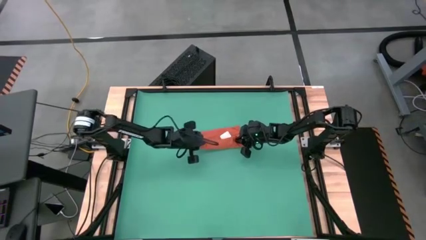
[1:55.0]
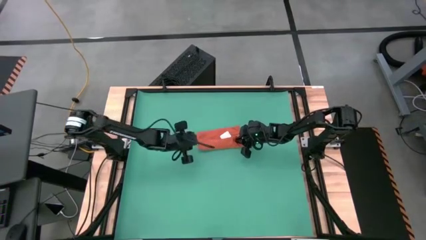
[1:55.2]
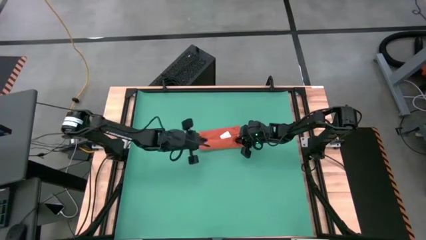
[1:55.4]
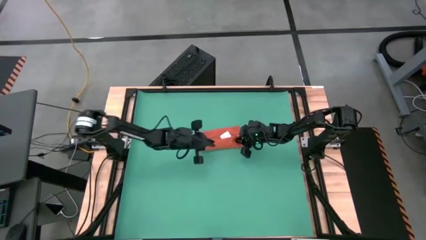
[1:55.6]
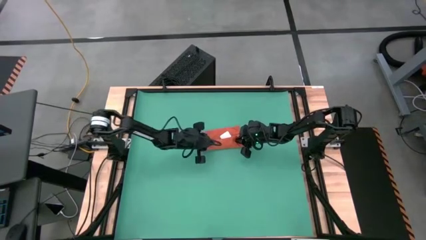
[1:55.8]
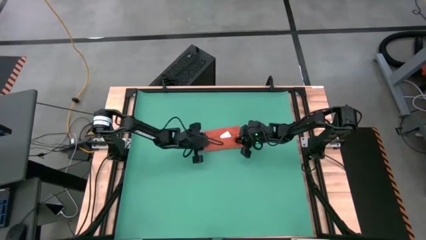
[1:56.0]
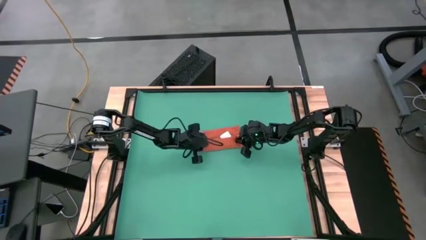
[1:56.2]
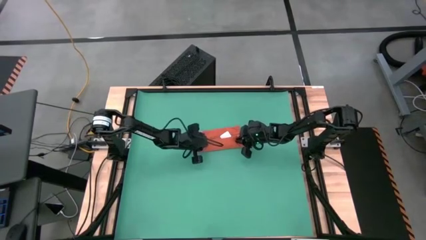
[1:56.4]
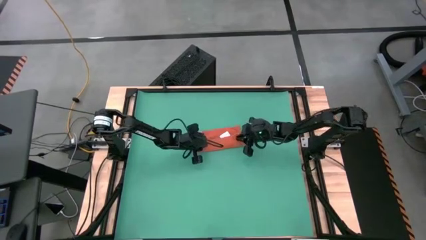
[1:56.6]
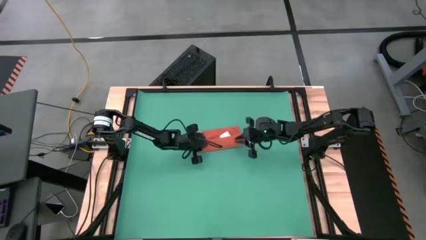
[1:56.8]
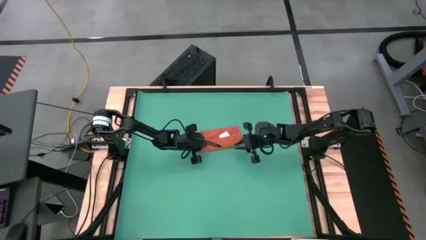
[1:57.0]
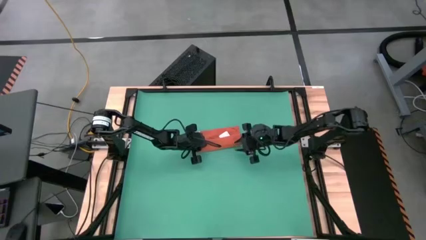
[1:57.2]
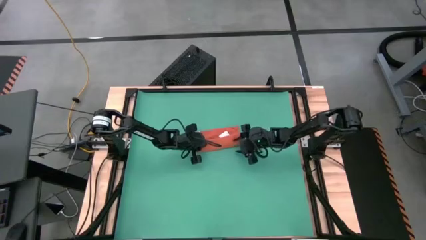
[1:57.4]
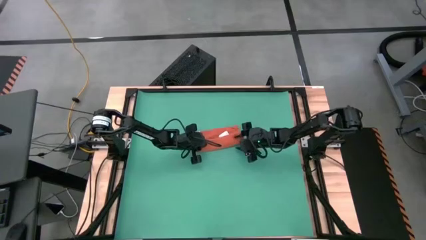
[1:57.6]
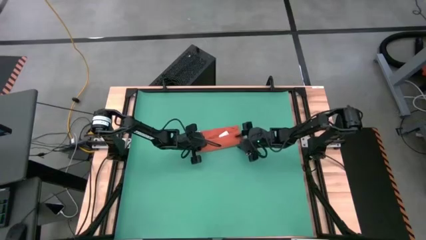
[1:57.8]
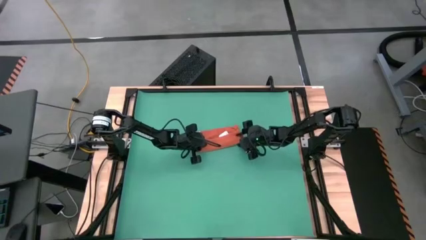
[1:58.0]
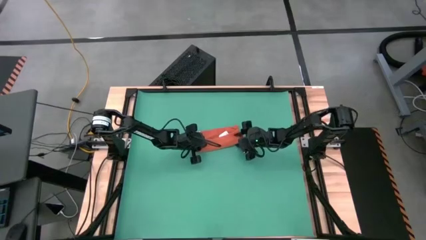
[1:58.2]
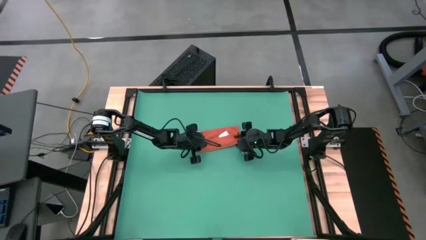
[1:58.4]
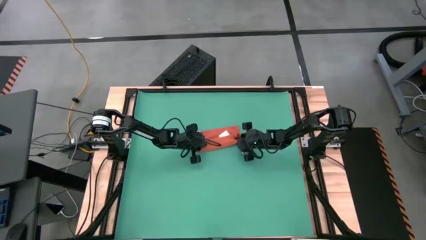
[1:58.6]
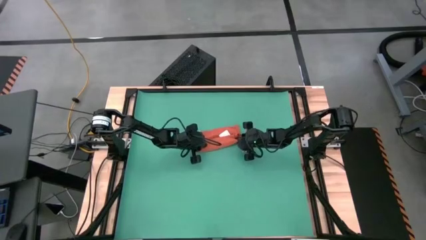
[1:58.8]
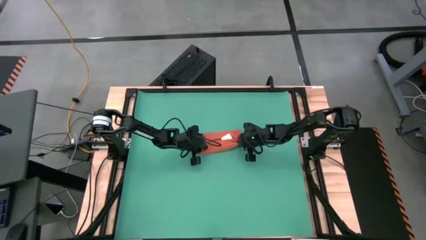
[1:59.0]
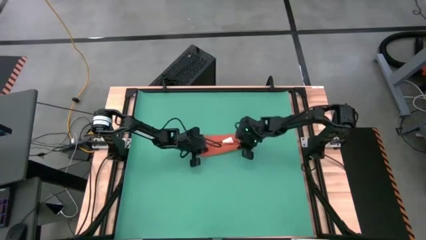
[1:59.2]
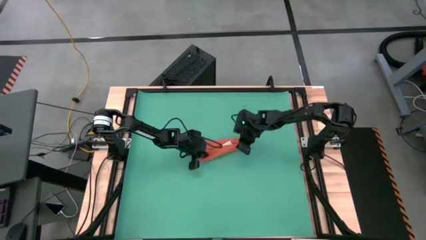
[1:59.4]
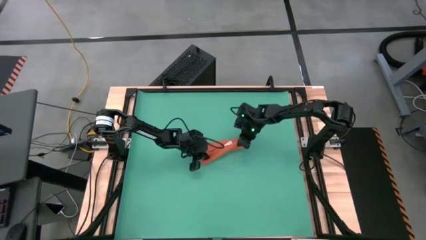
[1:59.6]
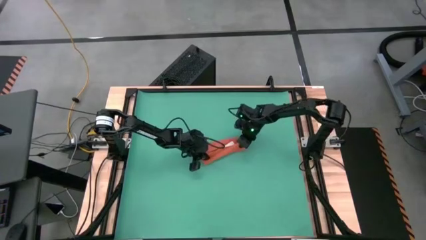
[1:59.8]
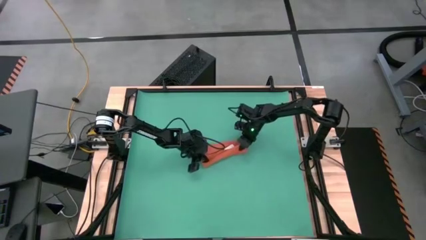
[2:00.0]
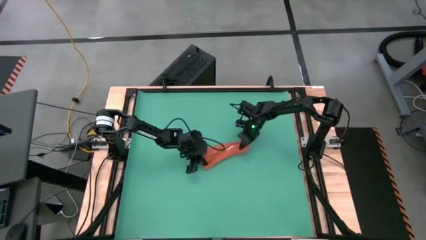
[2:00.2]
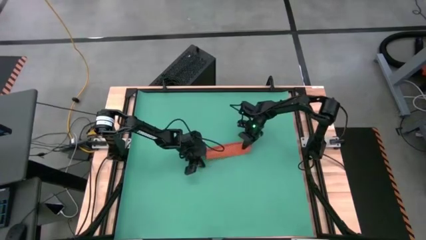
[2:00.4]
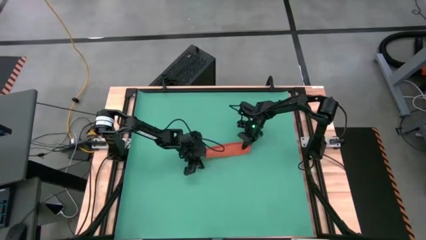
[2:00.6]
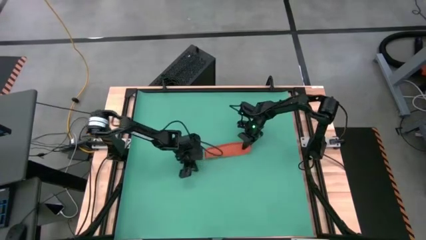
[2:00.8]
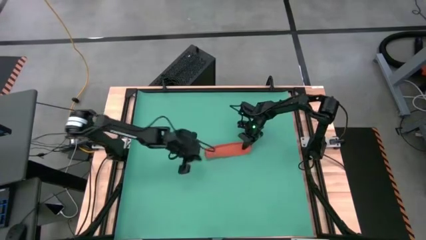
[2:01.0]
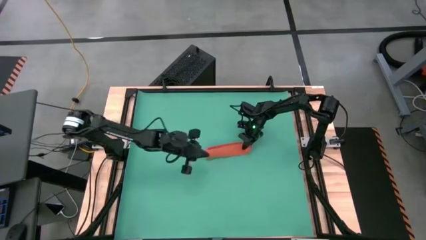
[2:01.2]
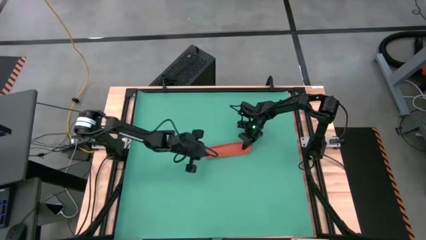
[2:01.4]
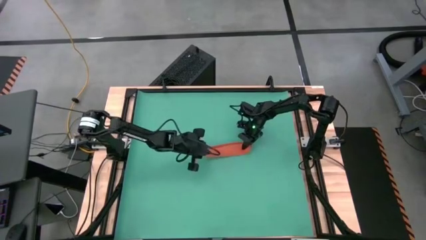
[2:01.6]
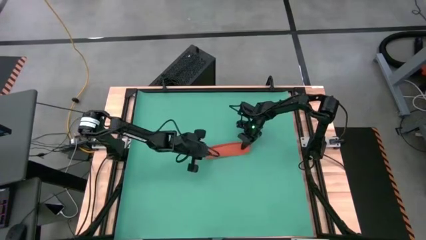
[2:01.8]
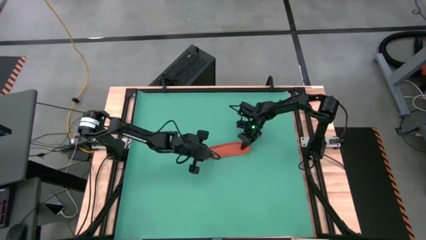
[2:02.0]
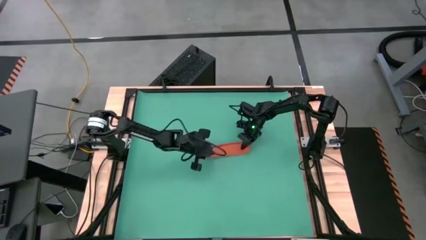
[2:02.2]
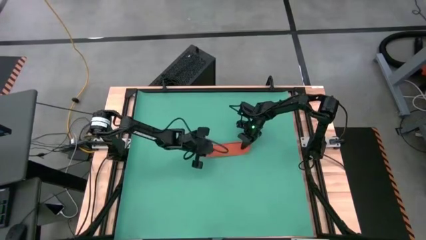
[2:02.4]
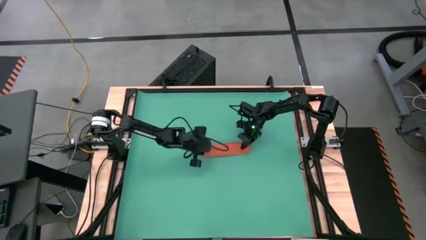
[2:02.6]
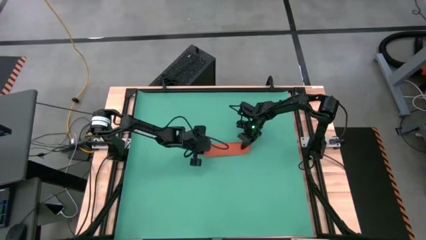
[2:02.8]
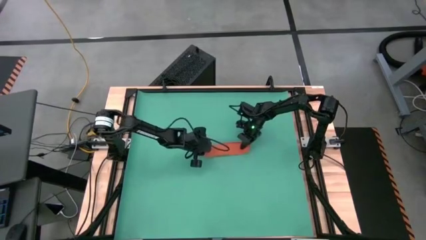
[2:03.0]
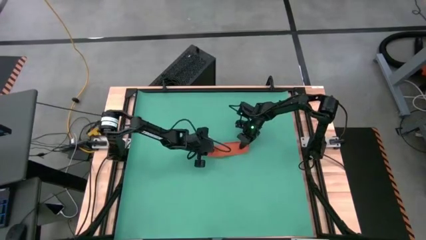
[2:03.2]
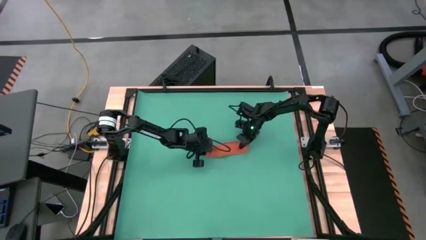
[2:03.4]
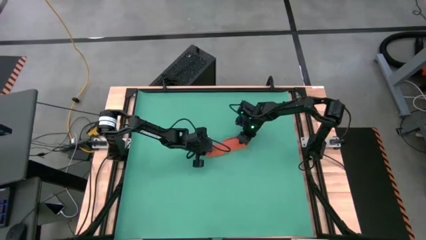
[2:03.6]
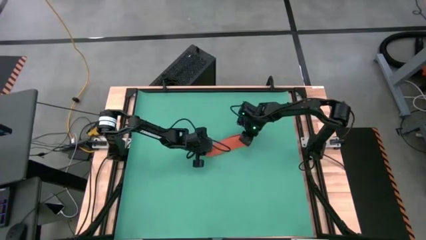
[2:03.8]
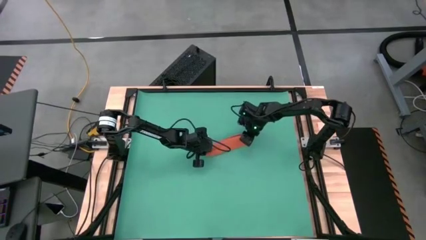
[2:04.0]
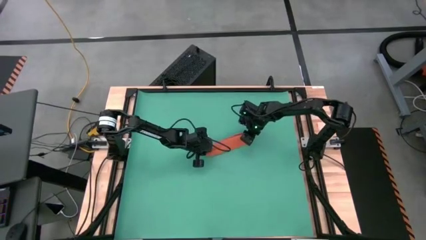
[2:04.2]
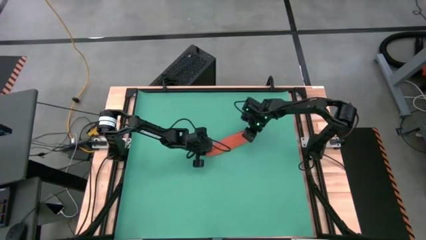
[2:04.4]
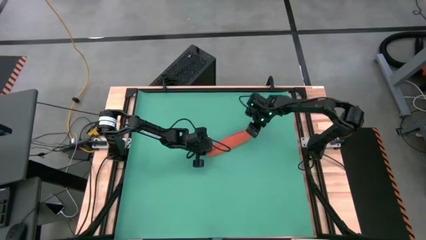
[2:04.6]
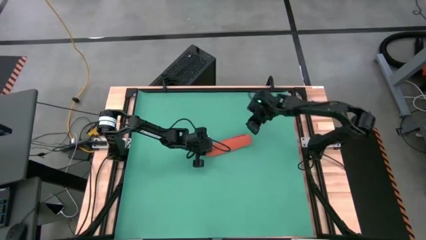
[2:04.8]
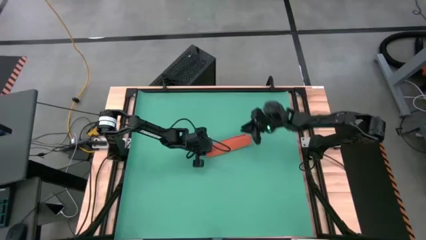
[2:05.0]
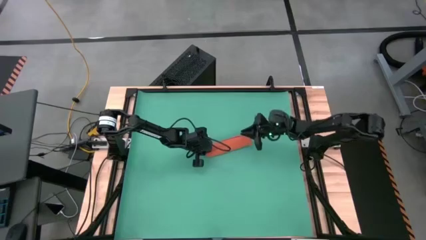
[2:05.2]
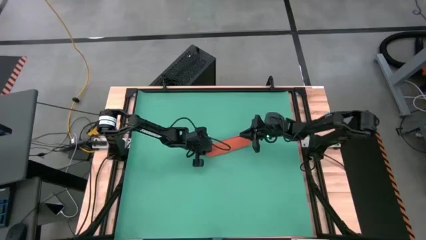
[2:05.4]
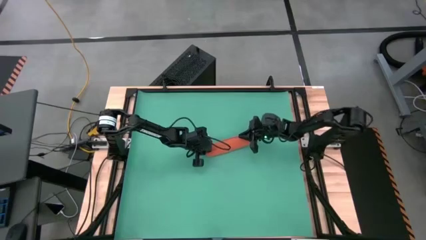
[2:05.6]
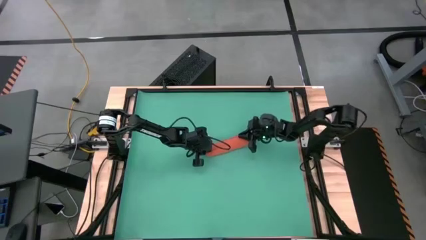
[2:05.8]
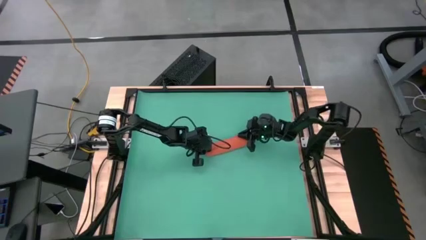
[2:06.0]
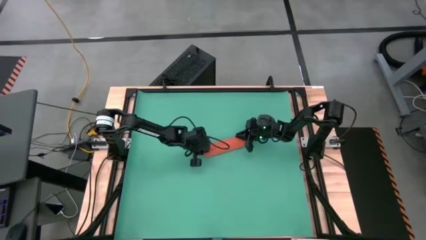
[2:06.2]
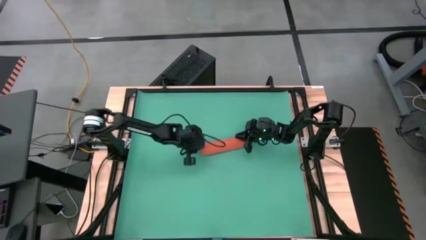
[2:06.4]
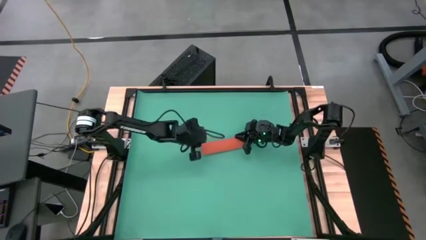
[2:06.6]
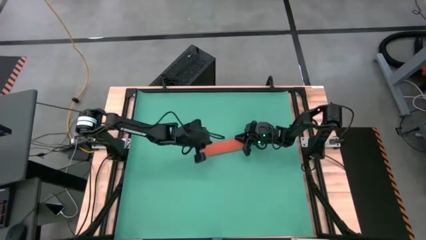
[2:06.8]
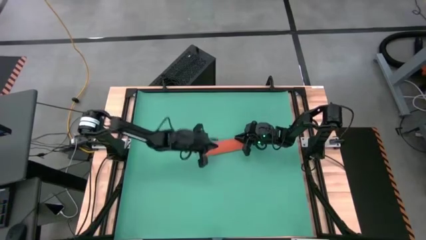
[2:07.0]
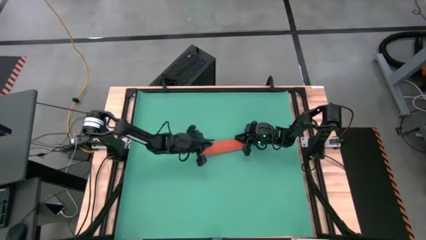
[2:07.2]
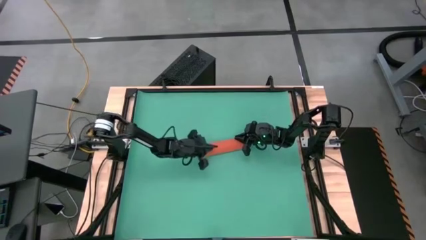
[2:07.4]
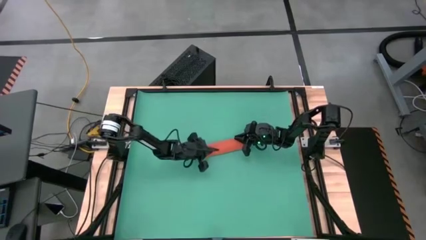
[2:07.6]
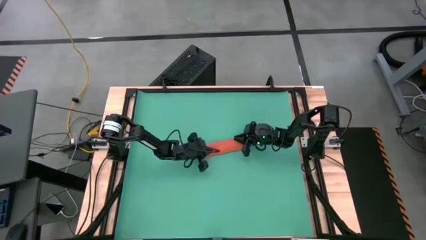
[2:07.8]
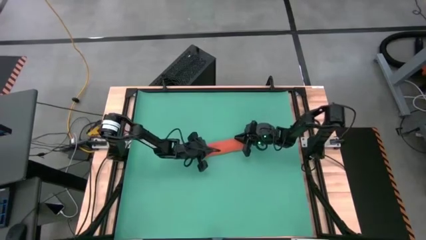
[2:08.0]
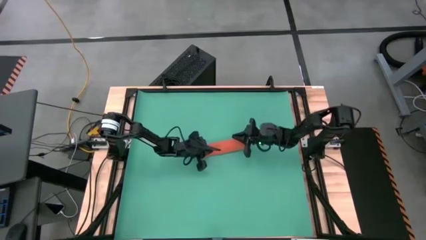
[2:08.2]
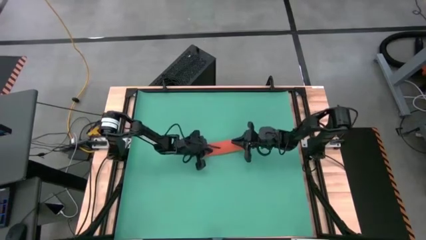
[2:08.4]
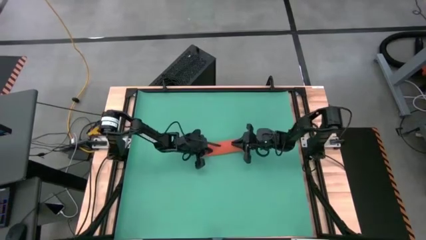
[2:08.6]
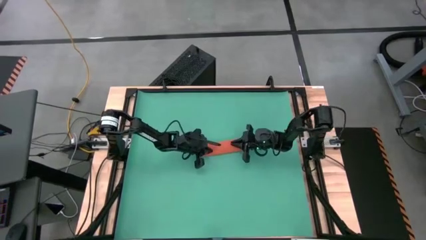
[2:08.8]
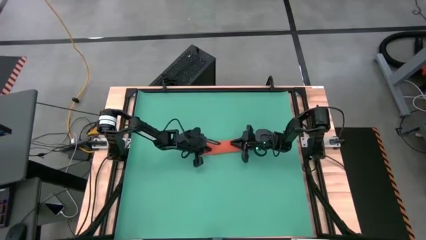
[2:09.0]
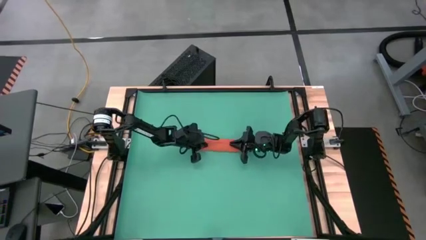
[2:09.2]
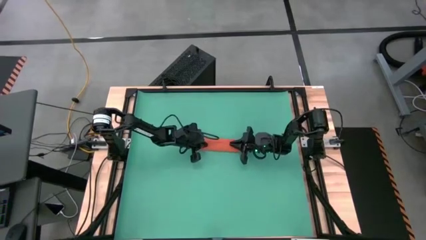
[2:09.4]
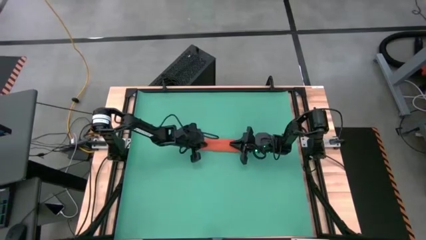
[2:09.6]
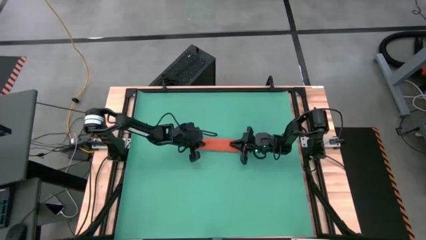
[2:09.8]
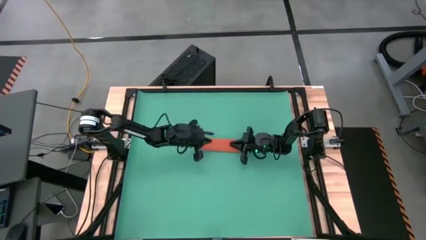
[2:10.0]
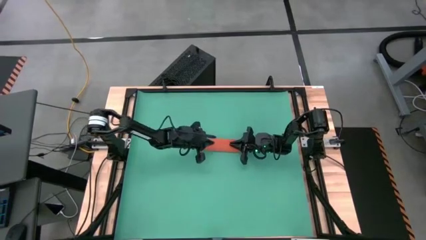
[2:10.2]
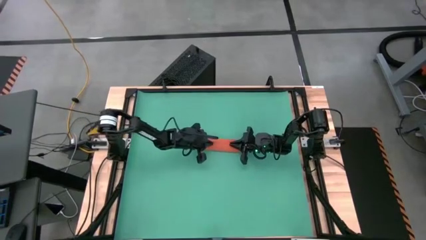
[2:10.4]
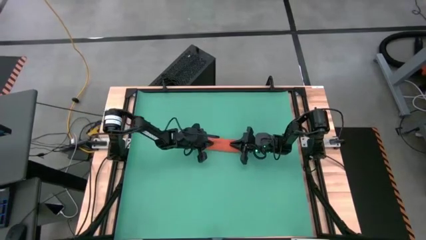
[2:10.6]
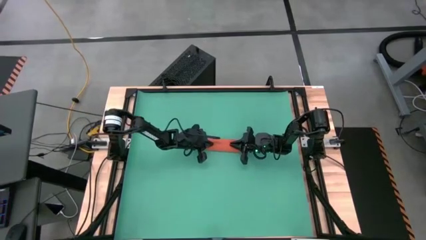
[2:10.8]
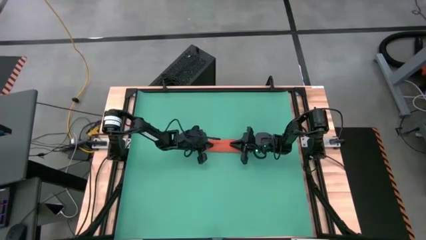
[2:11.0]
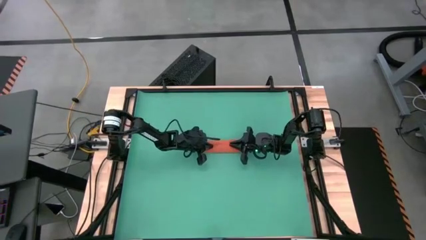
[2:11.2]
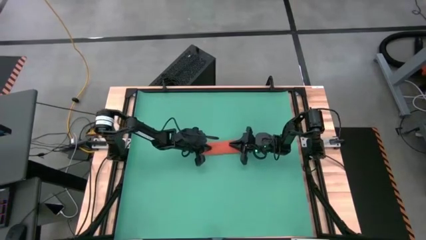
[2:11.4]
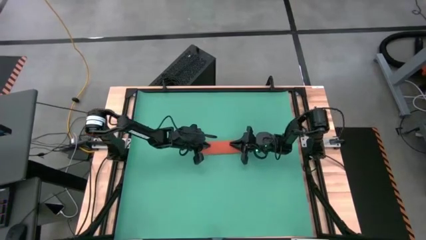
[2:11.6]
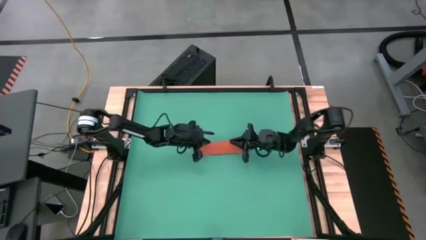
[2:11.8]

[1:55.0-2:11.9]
Task: Roll towel
Roll the orange microfiber towel
